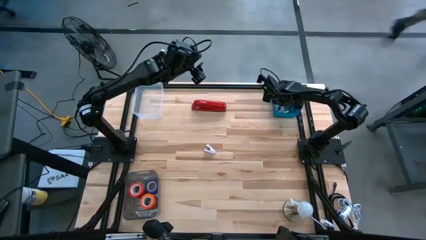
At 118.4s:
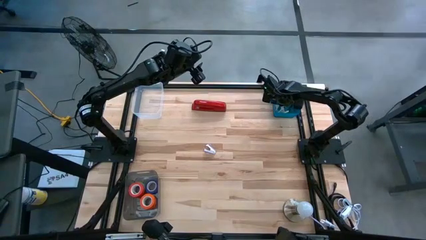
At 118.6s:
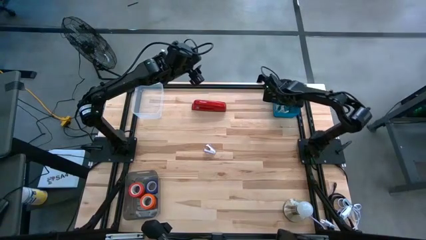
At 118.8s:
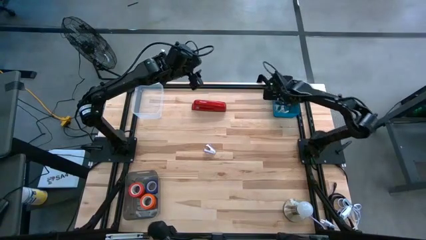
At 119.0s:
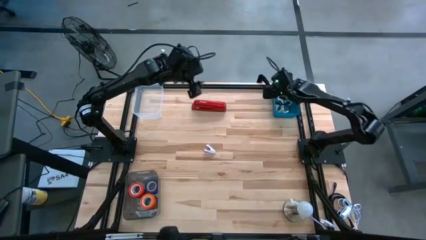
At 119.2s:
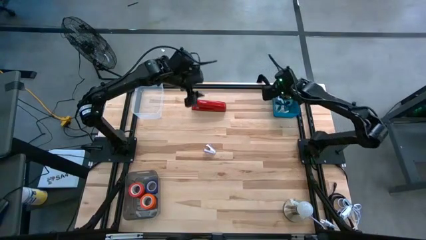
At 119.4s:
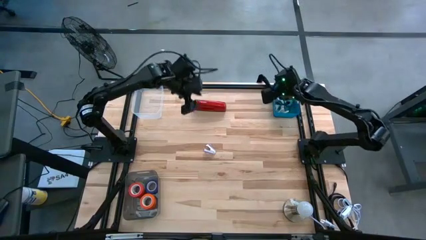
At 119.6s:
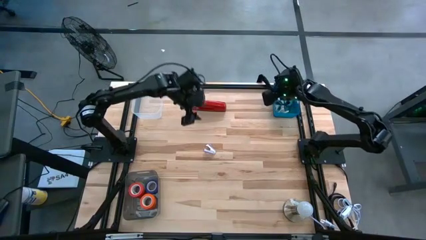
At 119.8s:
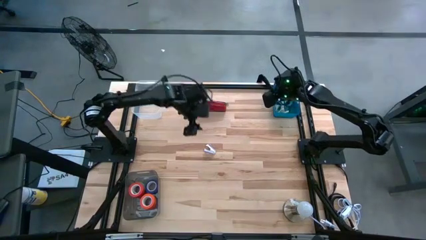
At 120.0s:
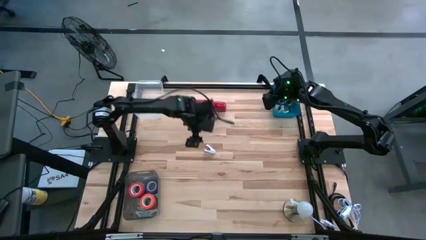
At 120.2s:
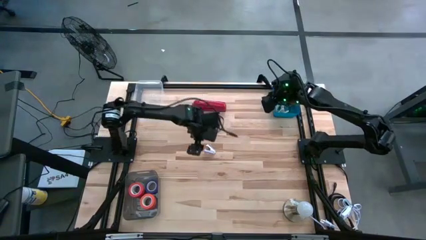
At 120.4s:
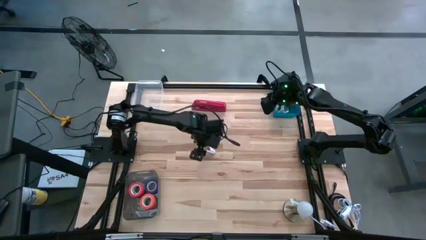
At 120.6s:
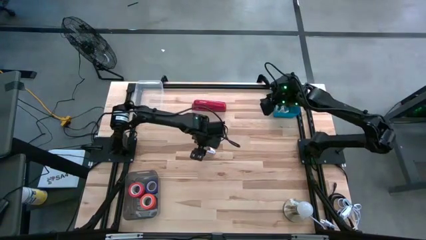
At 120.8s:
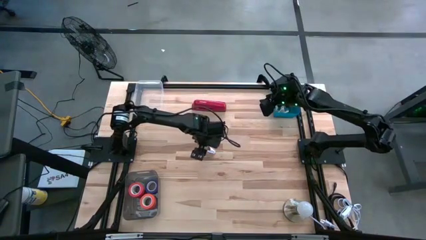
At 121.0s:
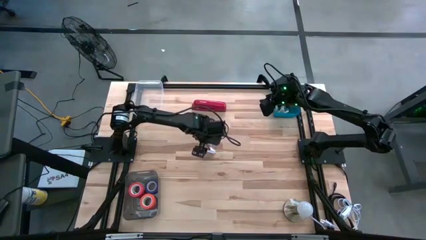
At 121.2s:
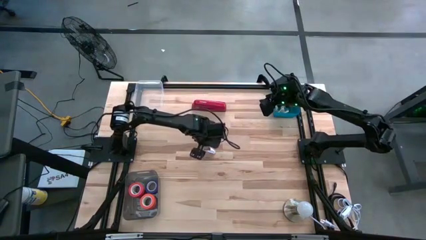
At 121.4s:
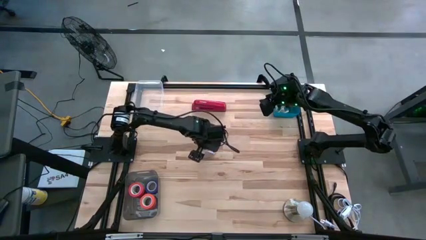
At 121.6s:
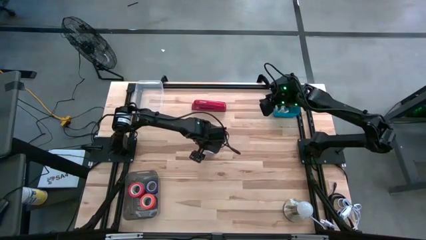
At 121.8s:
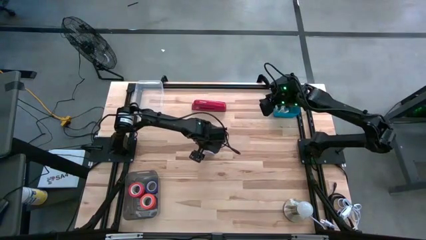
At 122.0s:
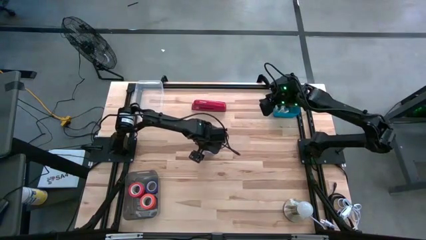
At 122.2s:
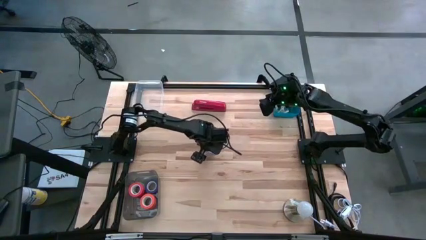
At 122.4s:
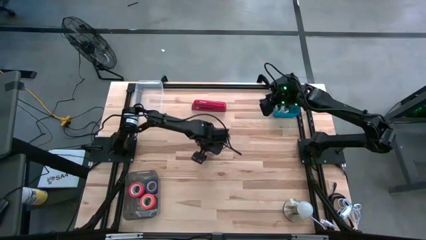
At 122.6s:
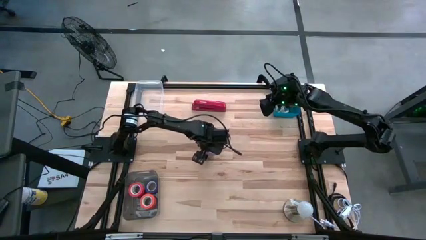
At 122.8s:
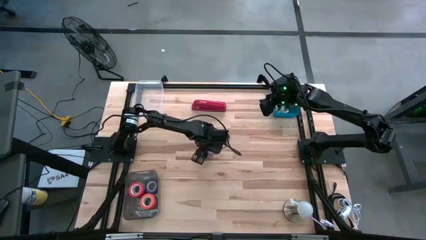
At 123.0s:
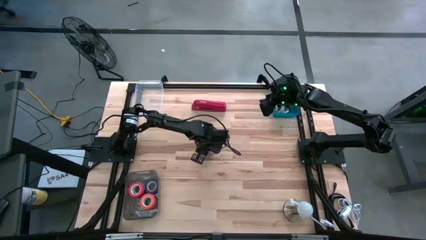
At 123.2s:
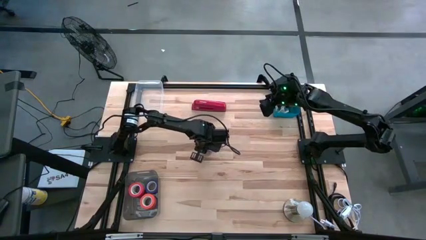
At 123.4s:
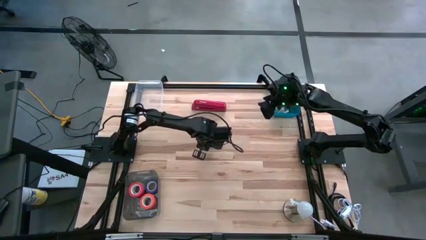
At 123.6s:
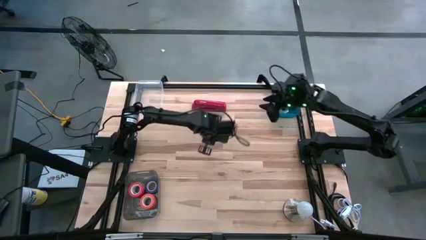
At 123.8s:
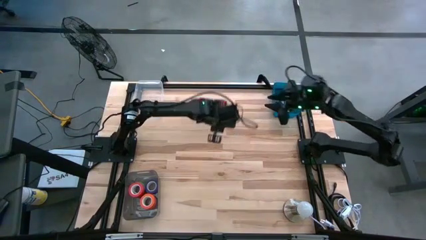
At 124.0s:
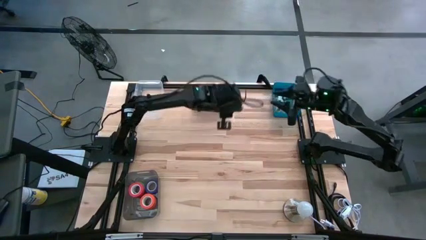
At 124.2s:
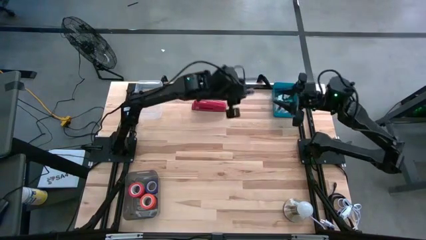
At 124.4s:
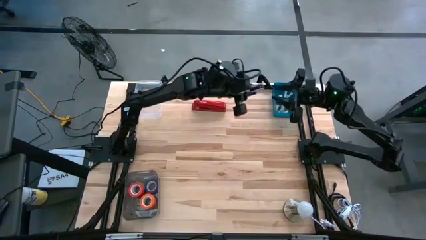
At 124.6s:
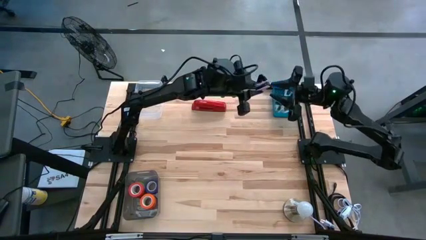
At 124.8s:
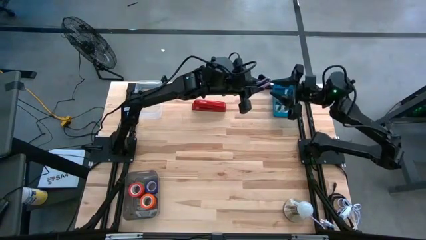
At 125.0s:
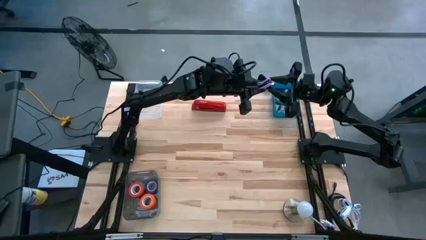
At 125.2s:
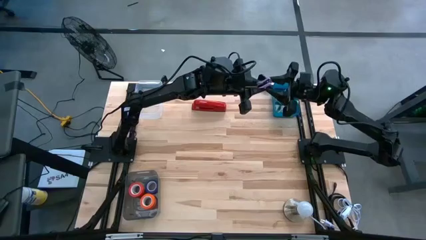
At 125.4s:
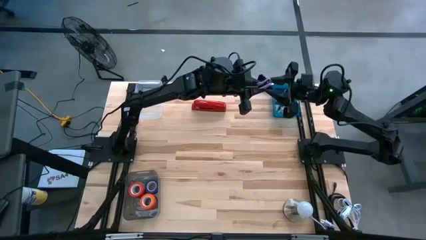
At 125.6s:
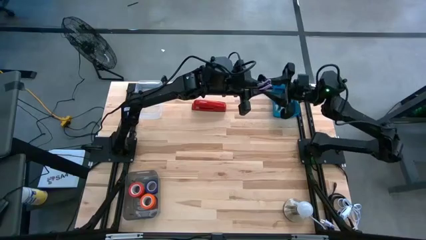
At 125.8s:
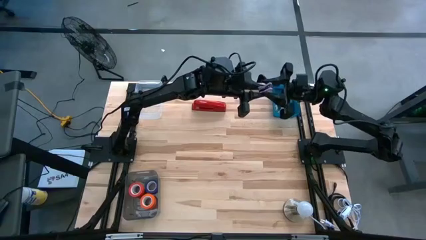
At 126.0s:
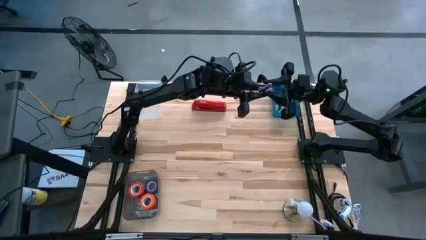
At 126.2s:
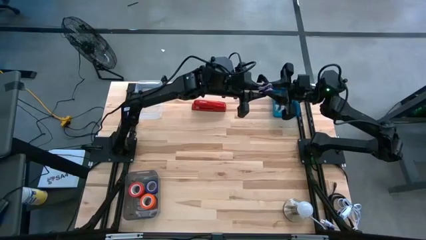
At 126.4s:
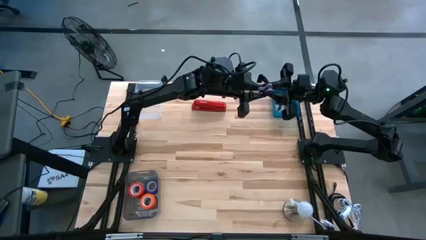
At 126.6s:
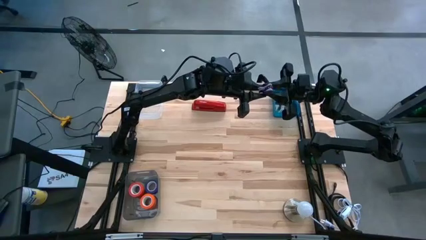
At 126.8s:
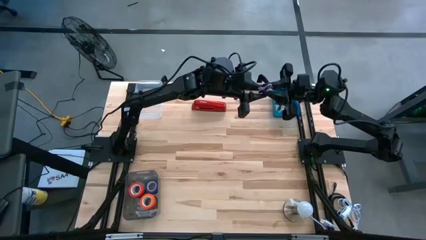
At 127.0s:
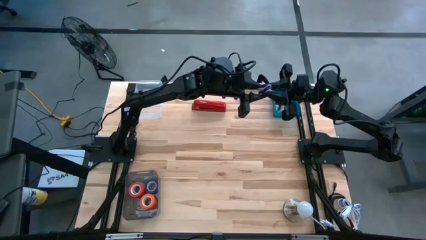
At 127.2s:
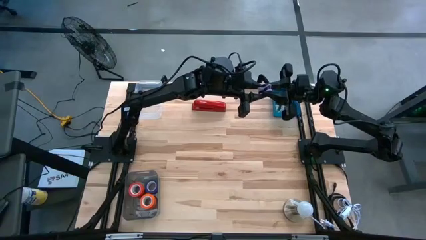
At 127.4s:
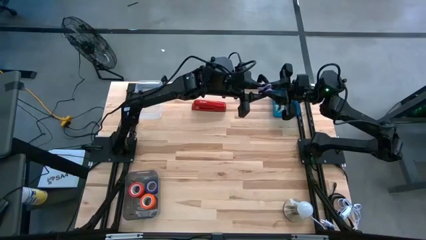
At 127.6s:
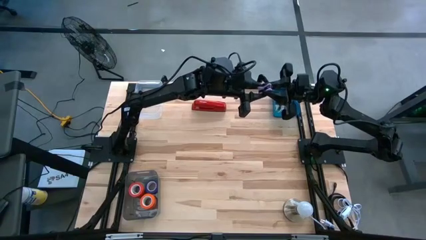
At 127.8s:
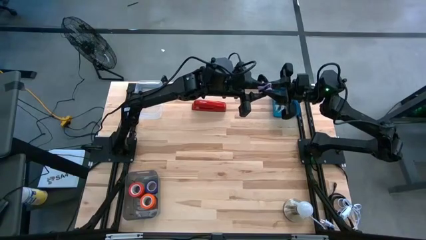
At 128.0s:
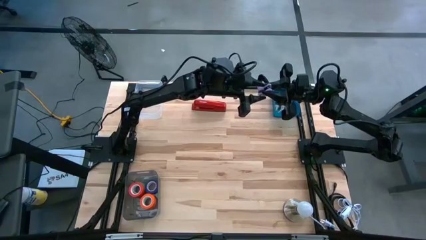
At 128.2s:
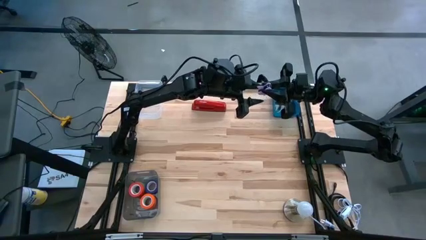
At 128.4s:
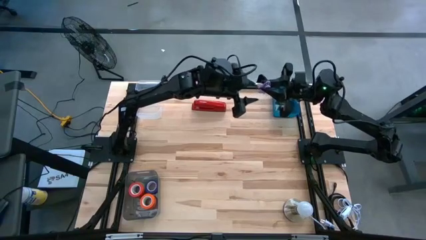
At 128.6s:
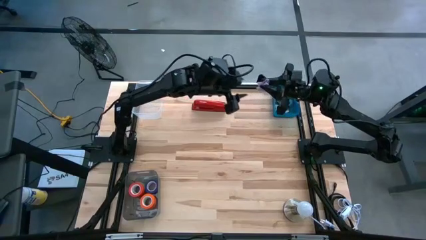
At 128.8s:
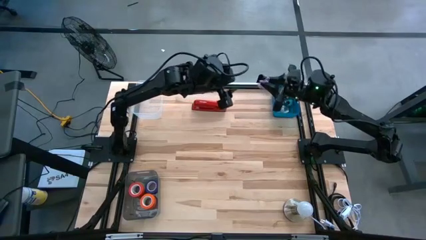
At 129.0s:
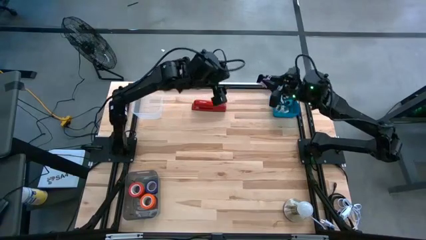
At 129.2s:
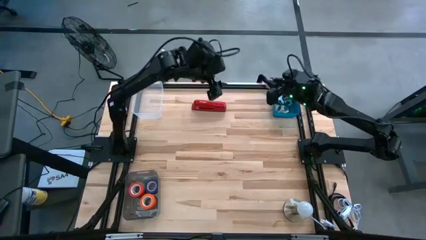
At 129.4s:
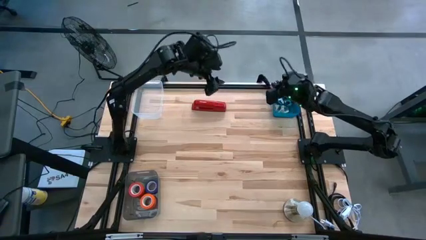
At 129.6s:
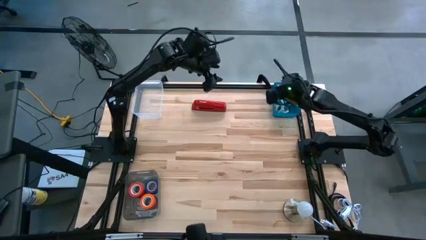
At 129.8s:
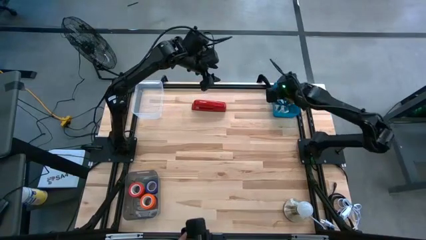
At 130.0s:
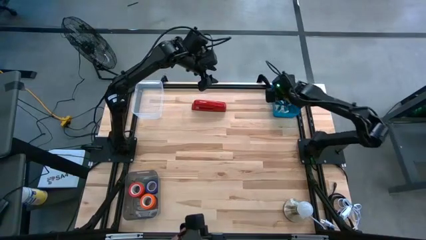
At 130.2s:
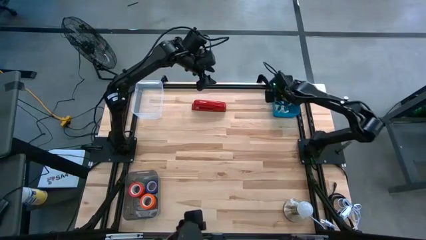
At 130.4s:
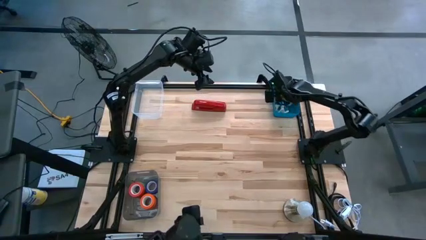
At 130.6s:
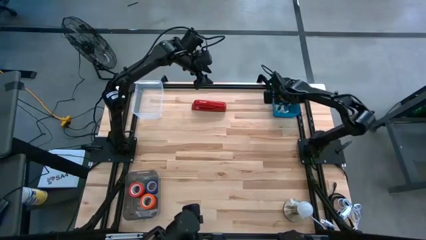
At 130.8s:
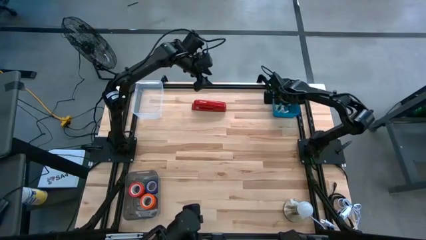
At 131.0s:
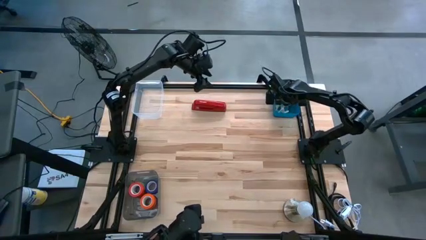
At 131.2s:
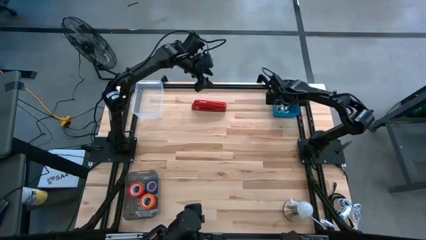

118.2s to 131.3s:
Task: Pick and place Stapler, Stapler remover, tape
Put the purple staple remover into the blue bin
